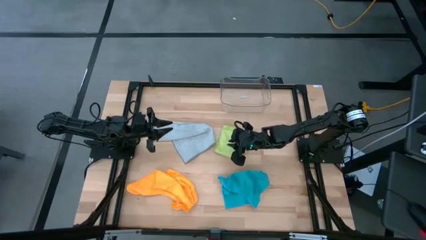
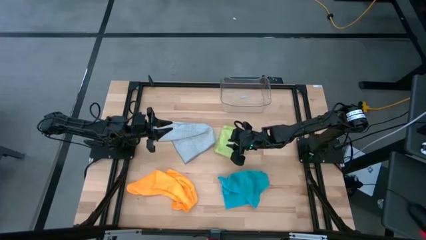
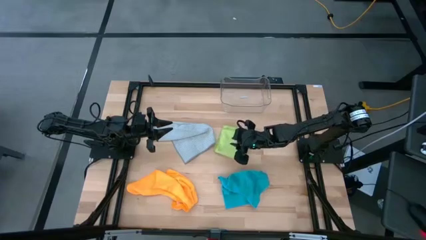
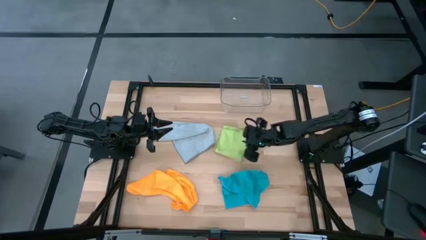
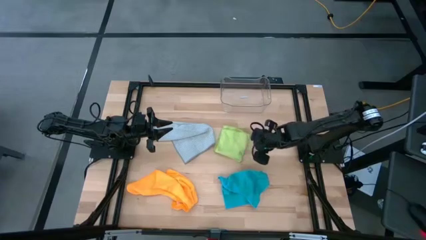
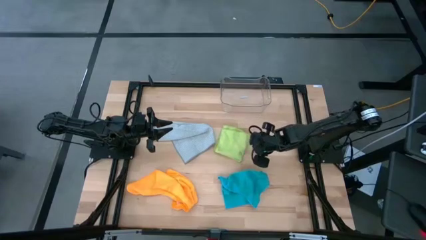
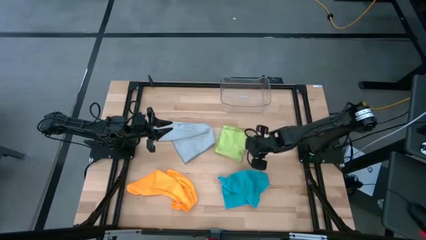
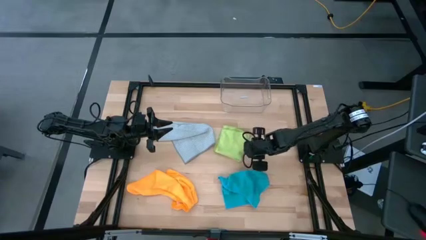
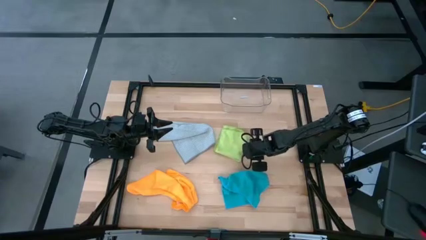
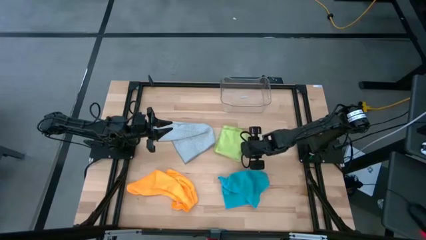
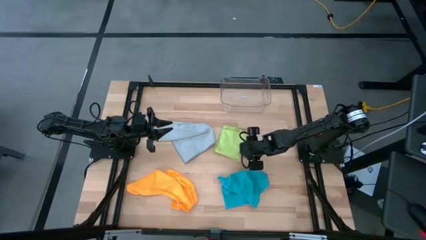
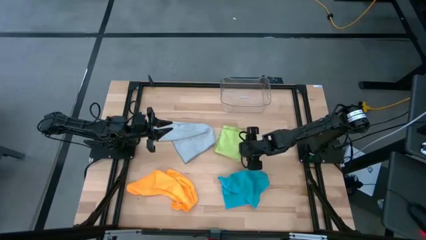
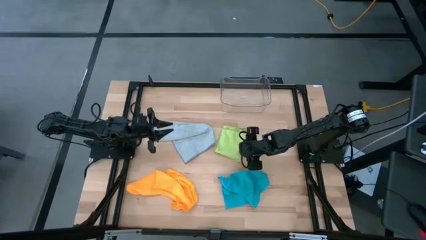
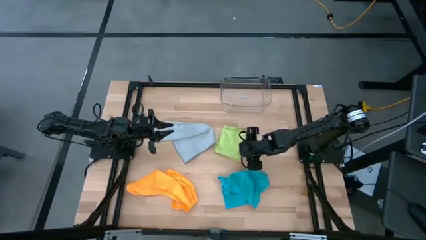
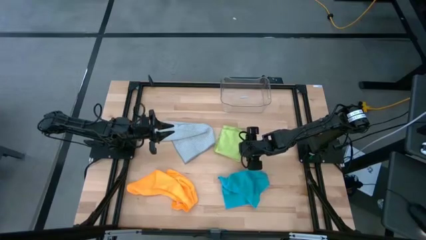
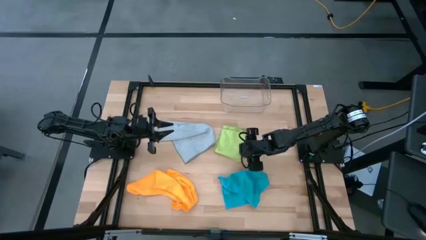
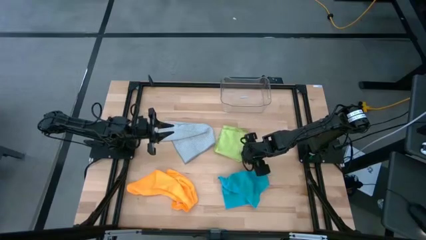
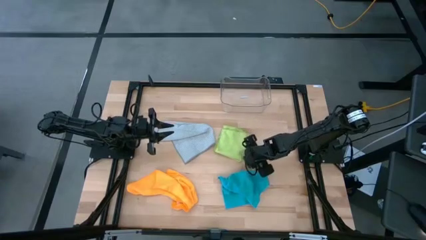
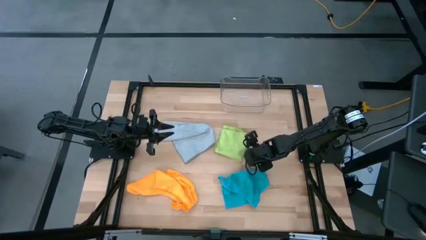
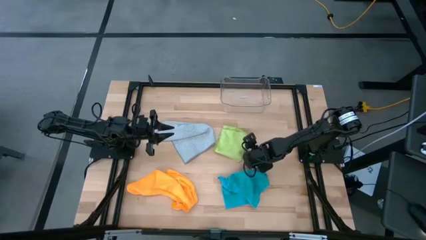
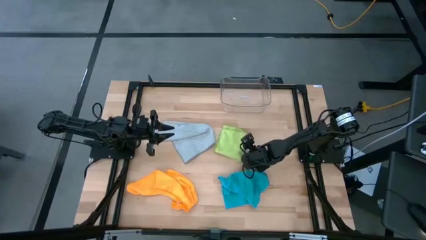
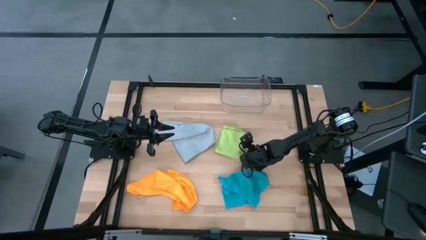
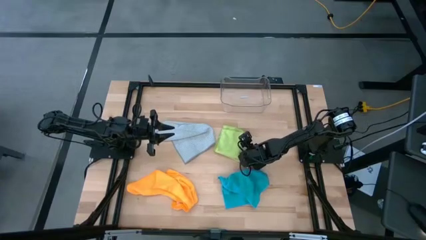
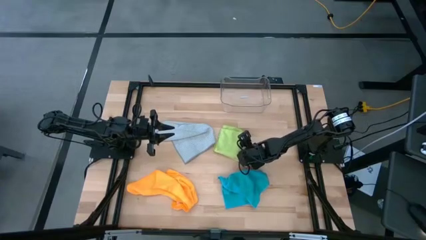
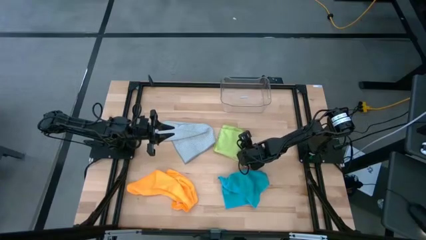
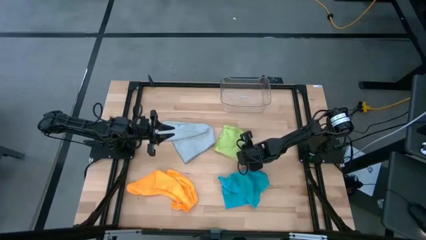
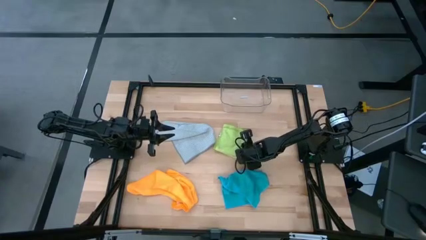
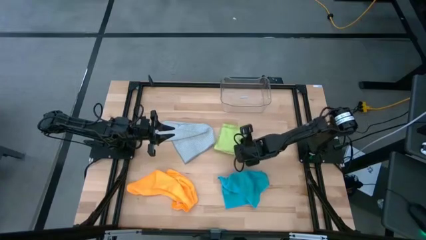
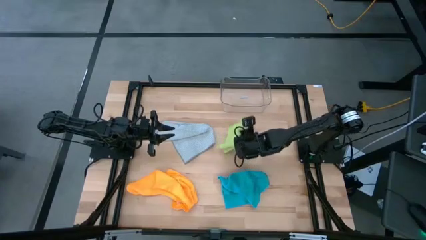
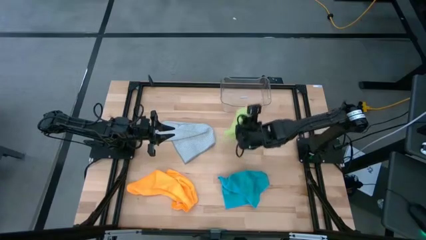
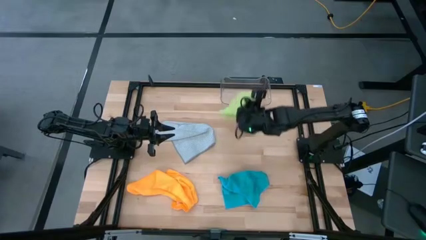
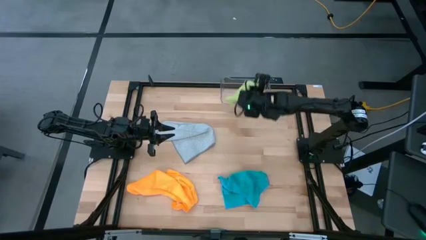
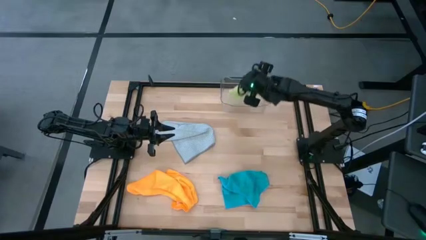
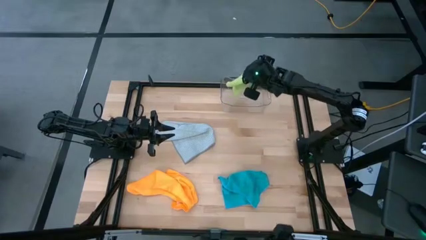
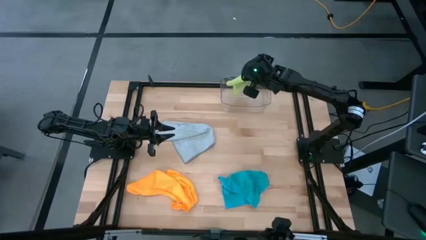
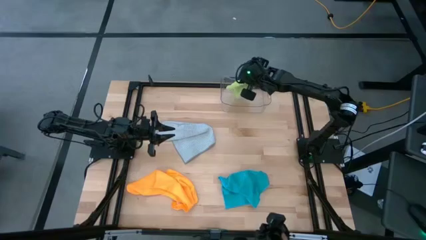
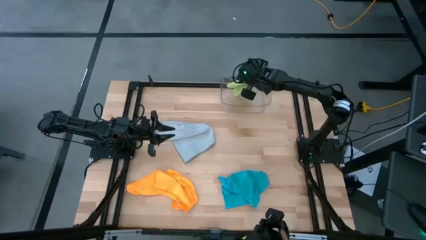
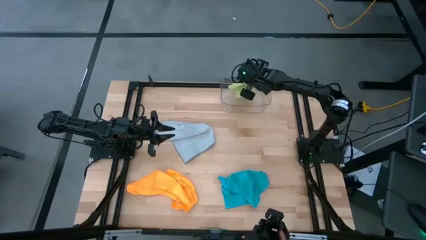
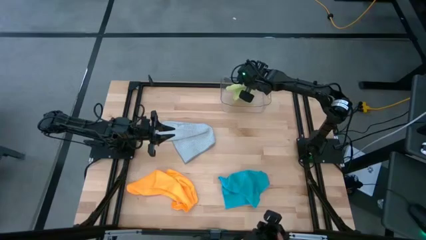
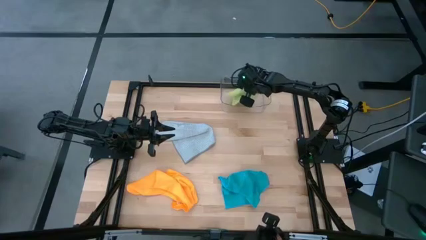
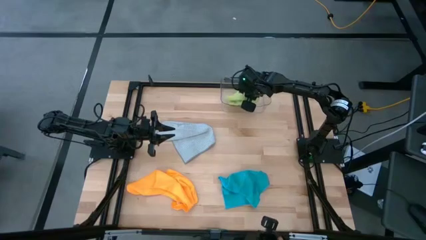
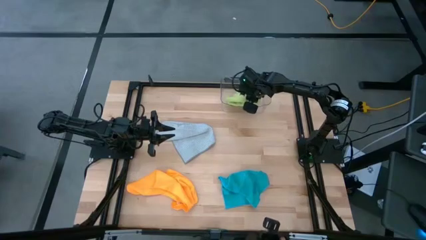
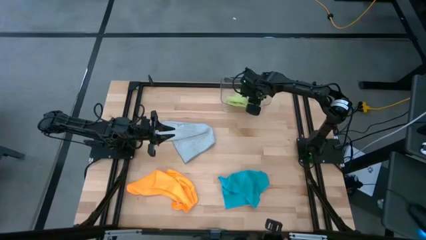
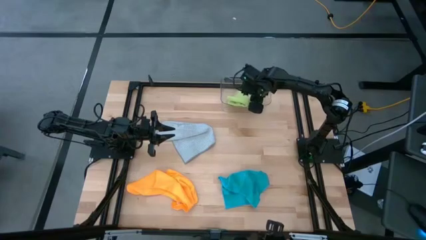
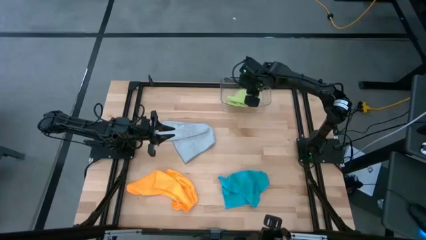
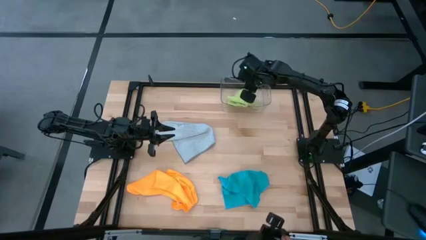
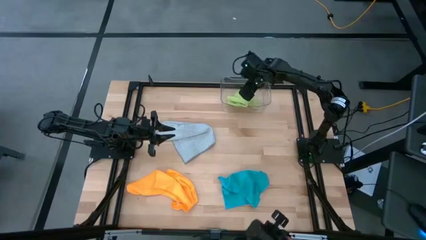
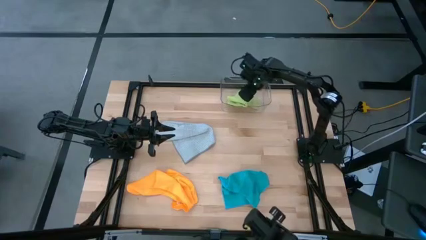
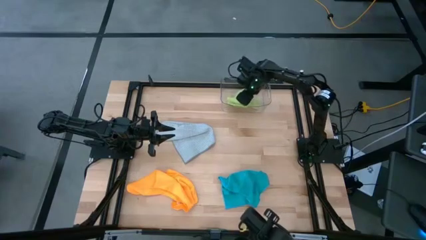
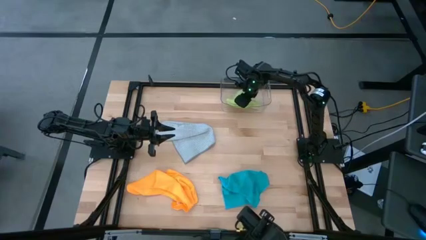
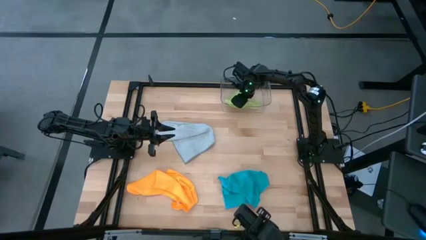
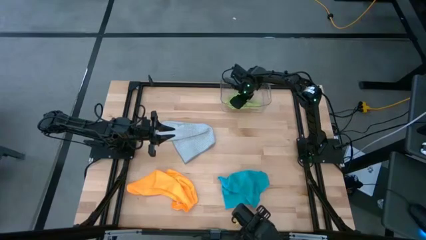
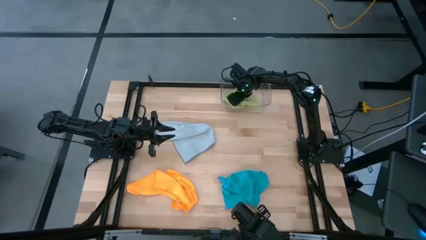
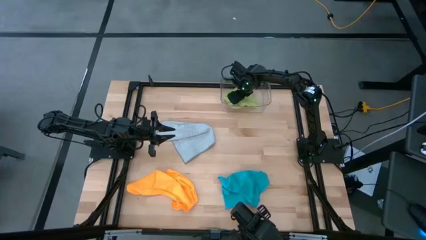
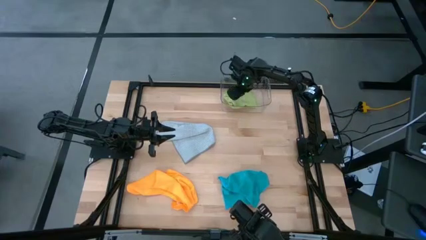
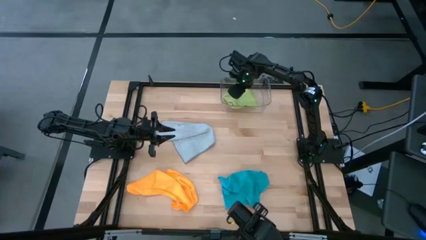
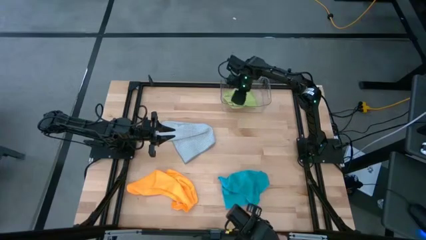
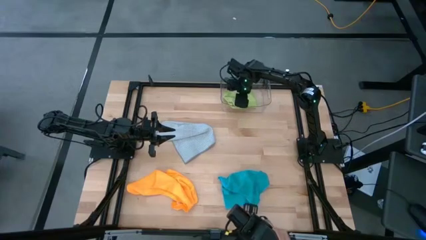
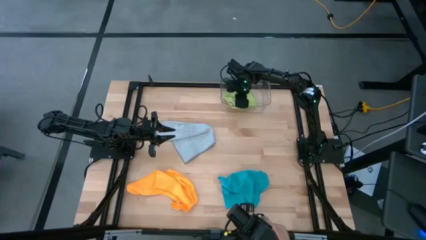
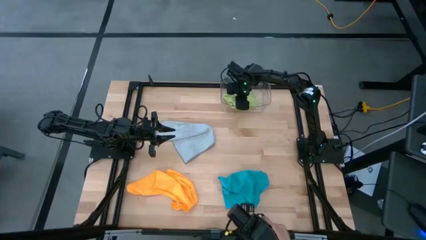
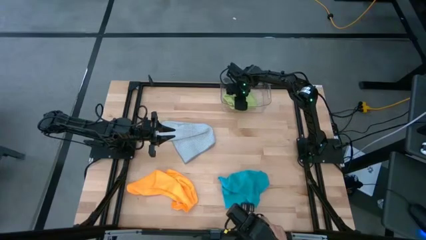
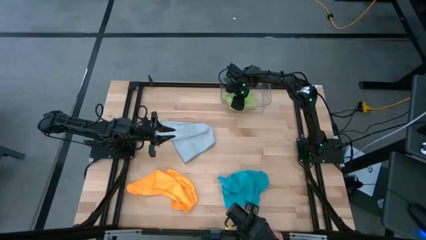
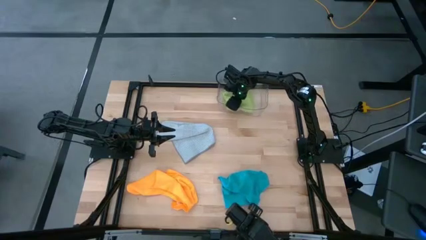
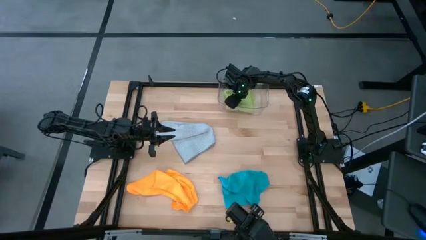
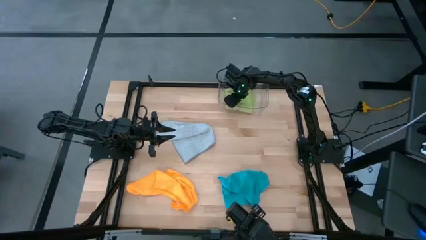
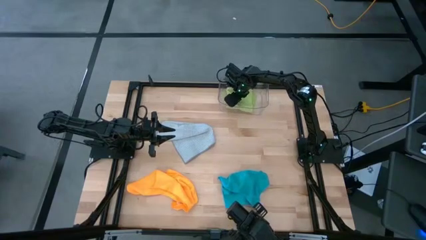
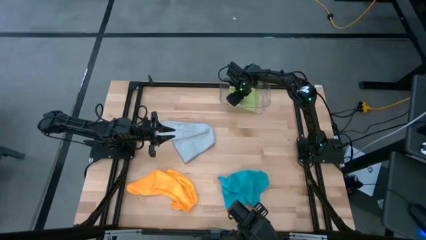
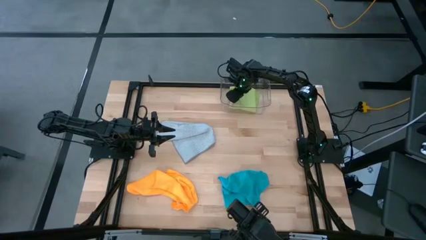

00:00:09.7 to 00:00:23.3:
Task: Fold microfiber towels
Put the green microfiber towel into the transparent bin
